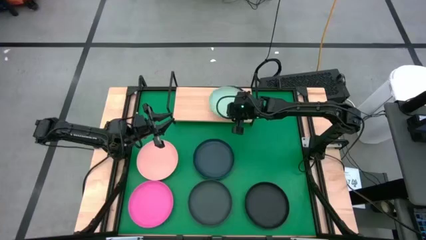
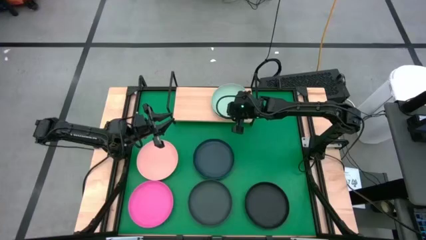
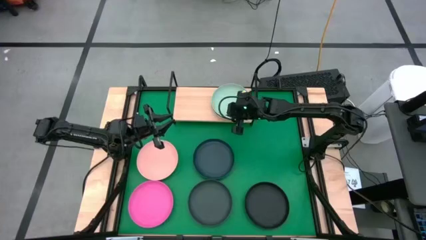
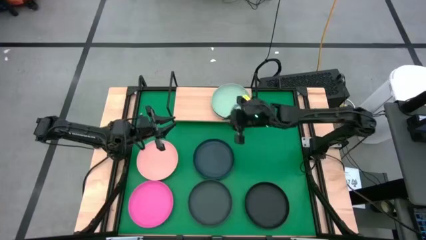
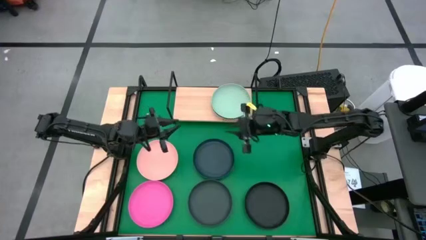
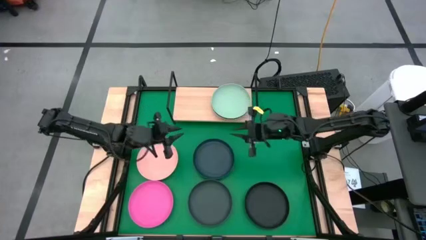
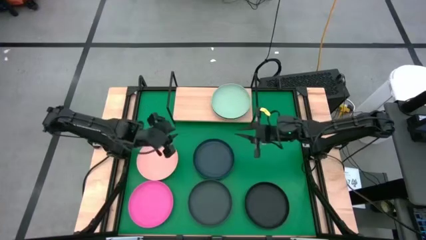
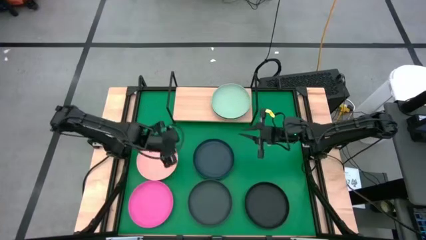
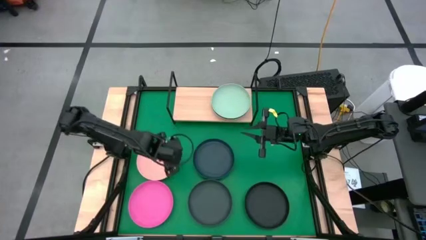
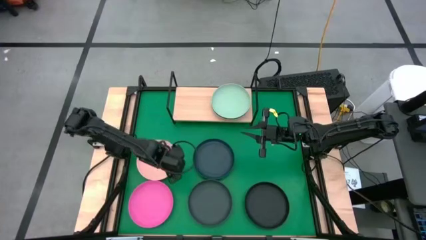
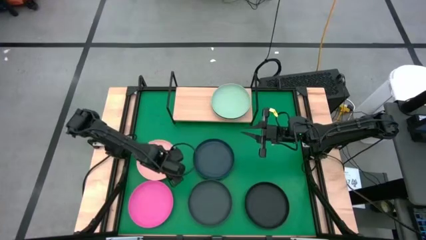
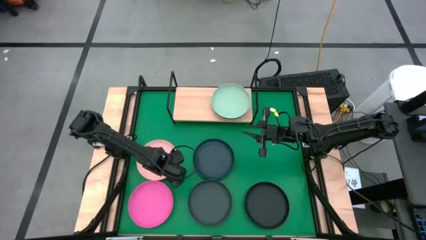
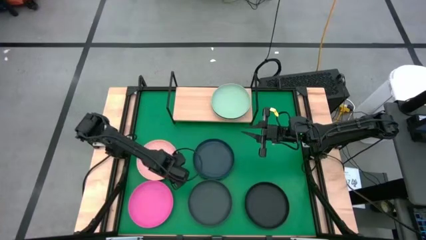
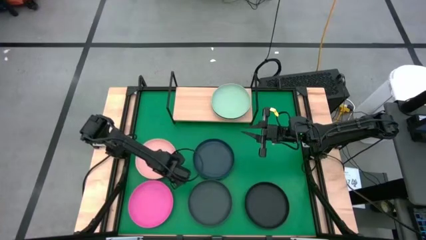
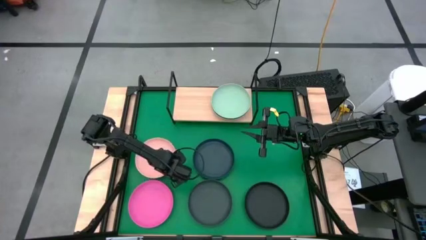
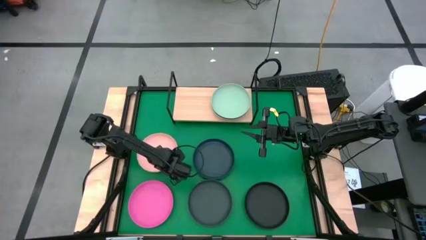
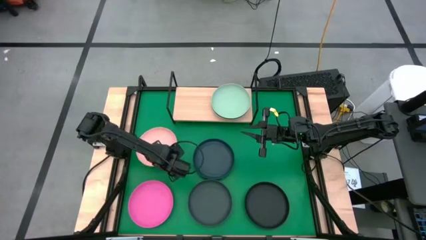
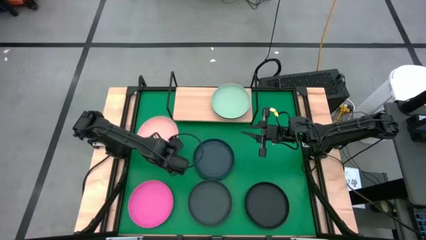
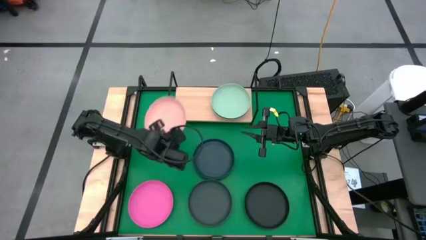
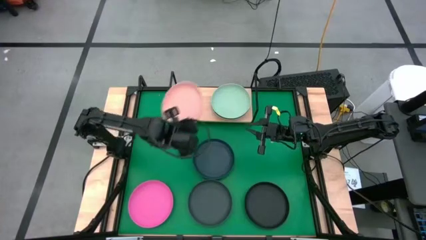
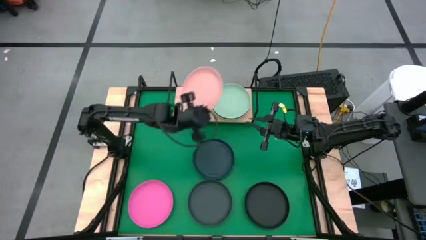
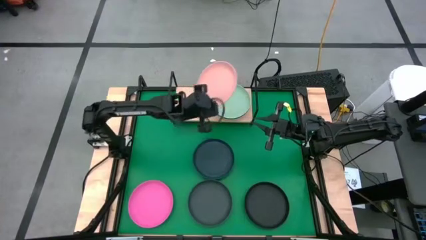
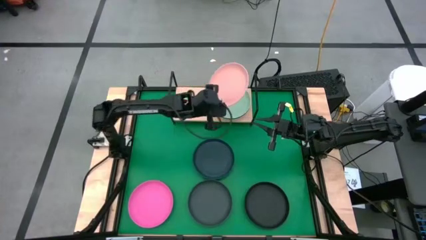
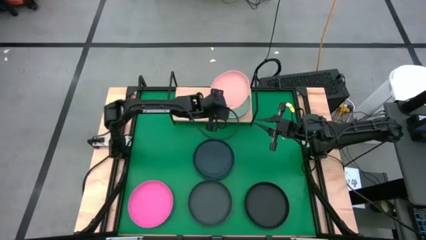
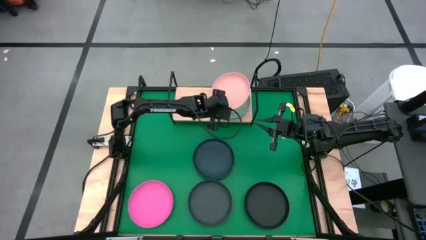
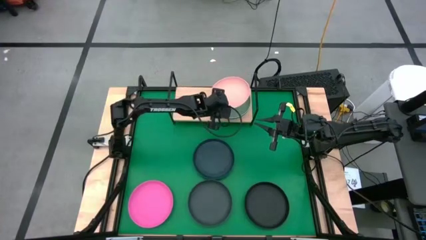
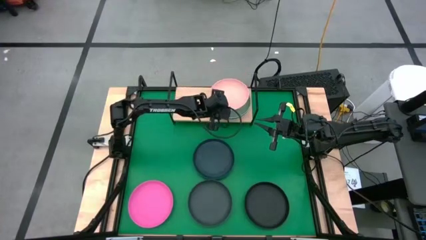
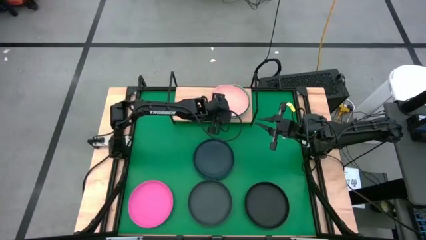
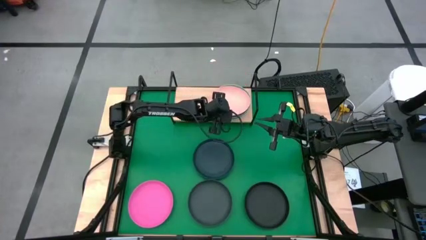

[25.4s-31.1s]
Task: Place and stack plates onto a shelf
Stack the brown plate on top of the light green plate on the shelf

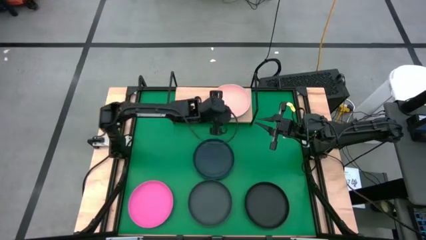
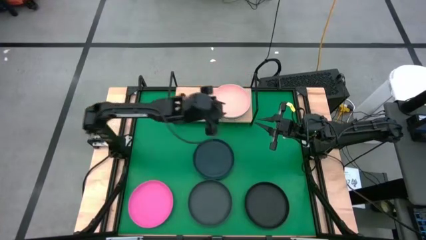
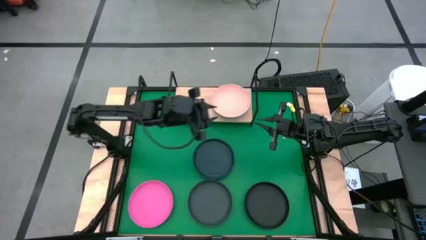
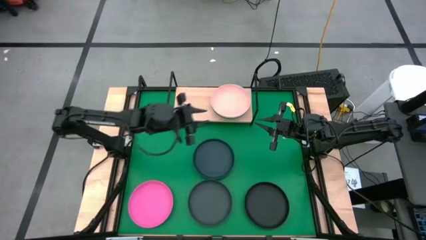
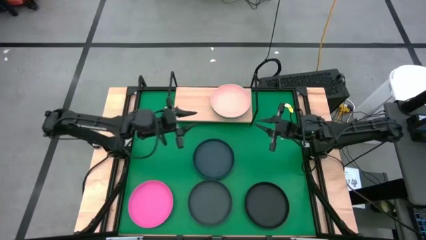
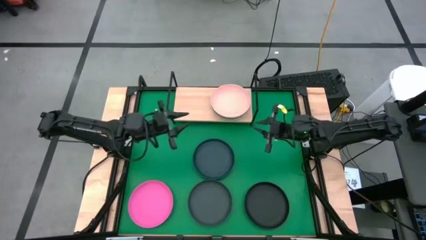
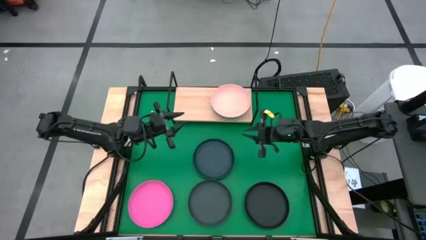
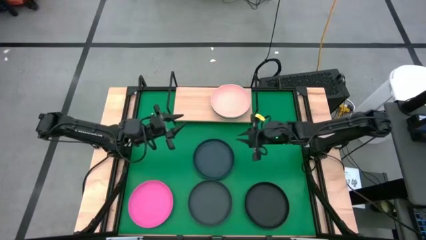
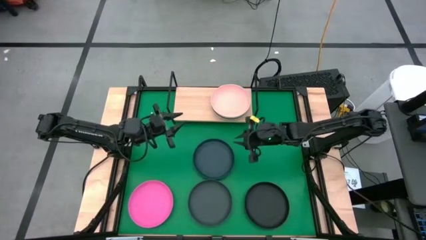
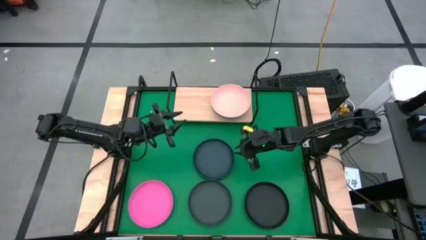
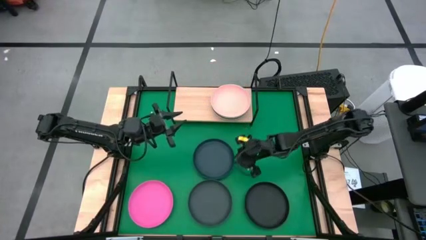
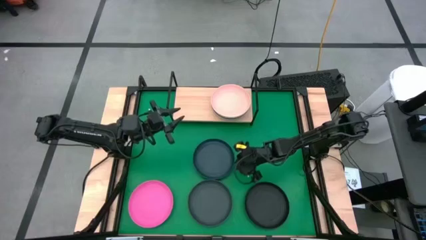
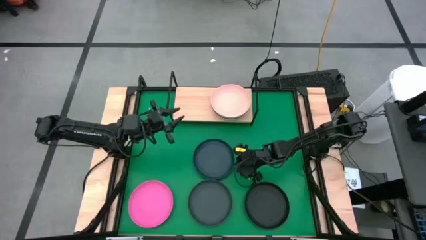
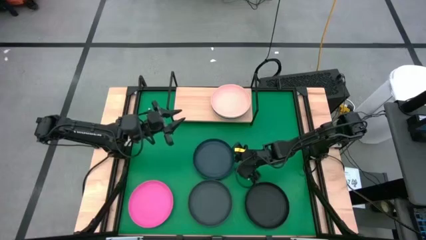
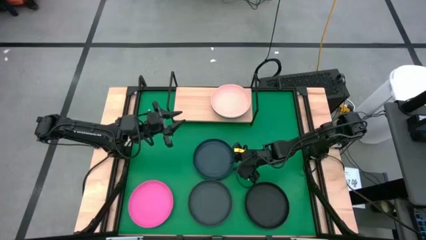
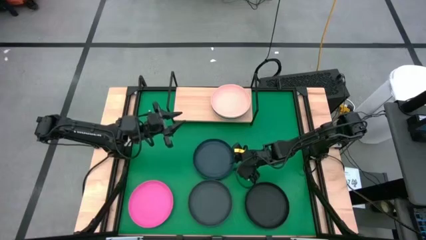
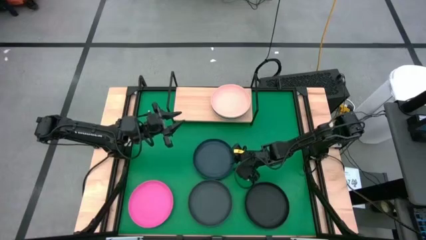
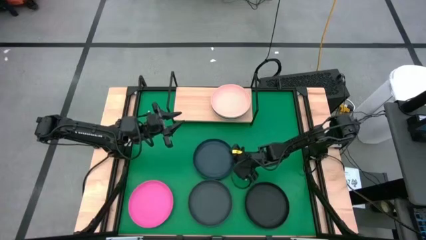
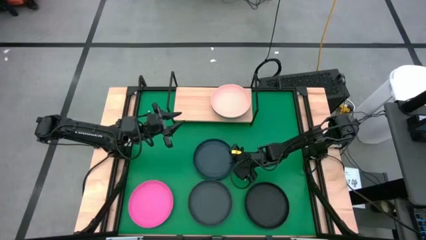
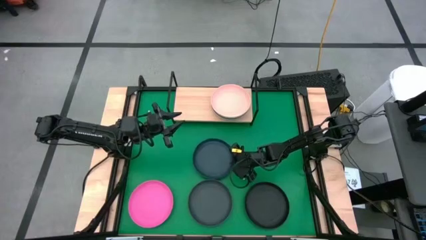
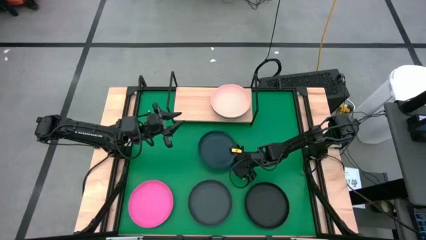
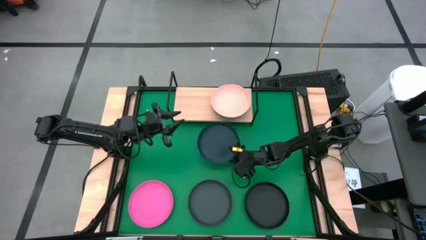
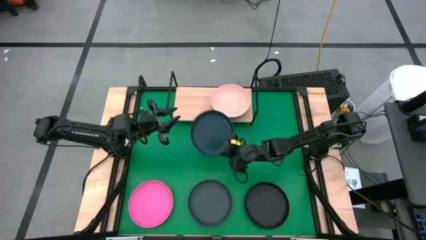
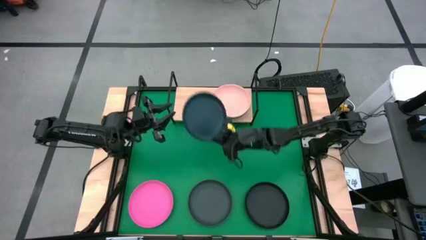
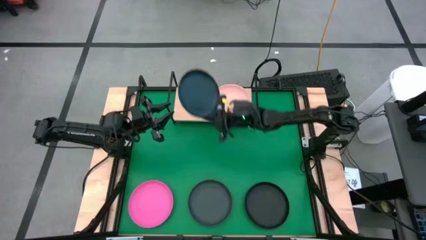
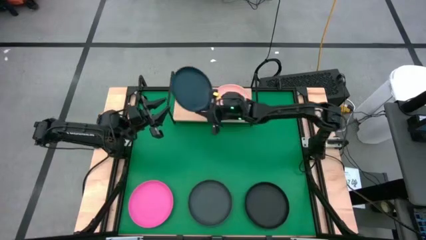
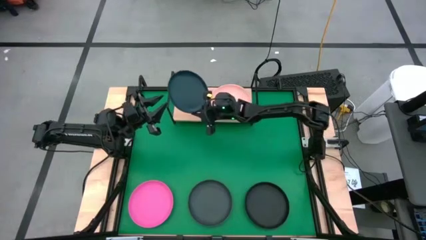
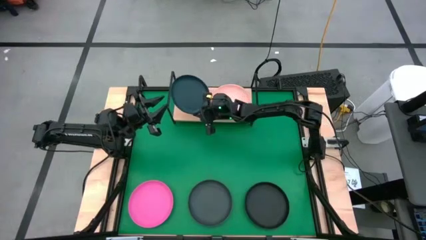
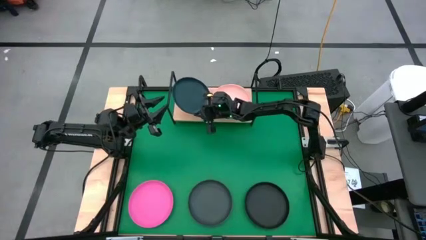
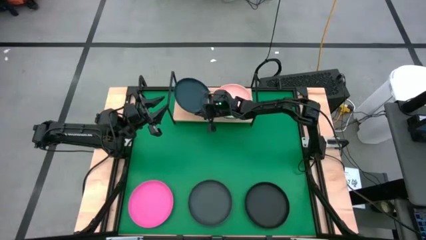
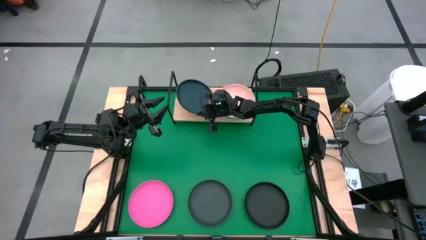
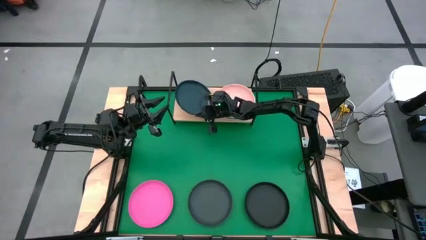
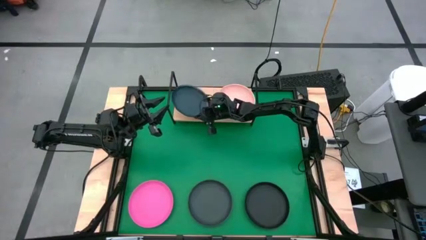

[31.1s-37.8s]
Put the blue plate on the shelf

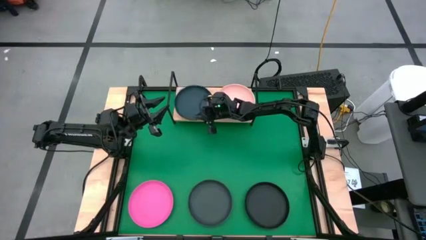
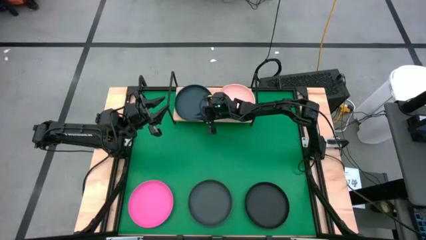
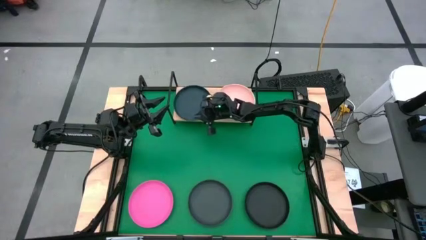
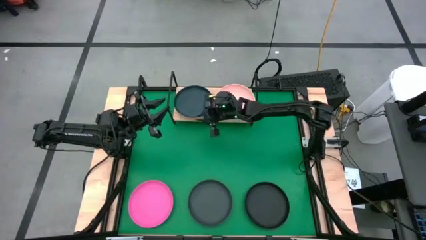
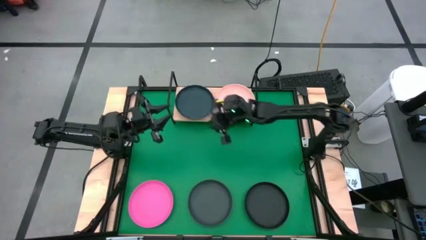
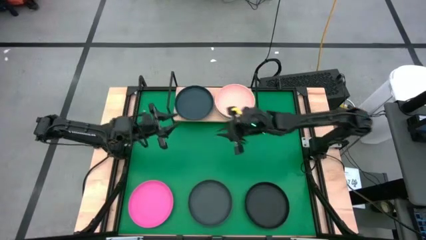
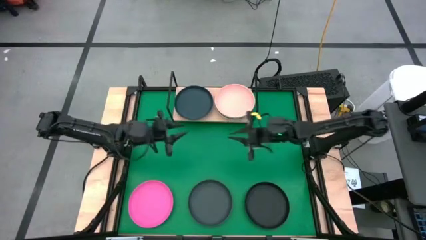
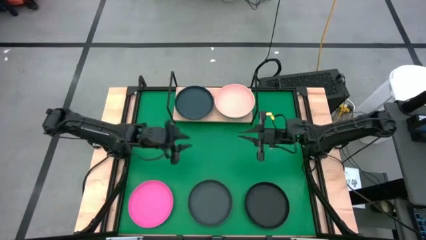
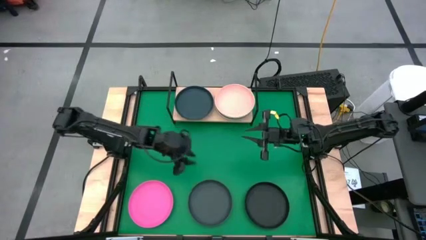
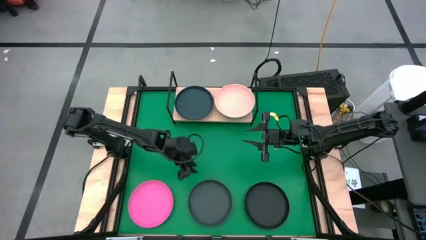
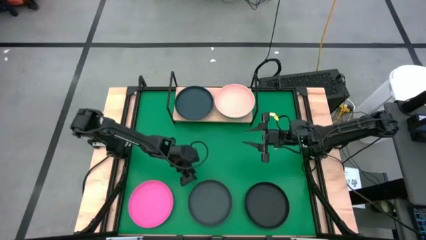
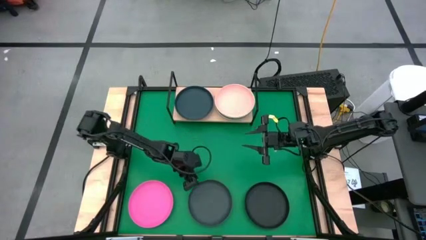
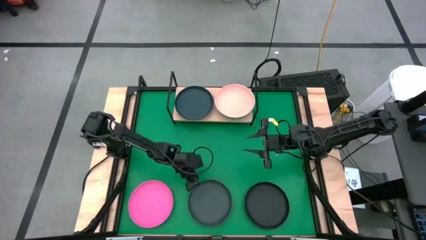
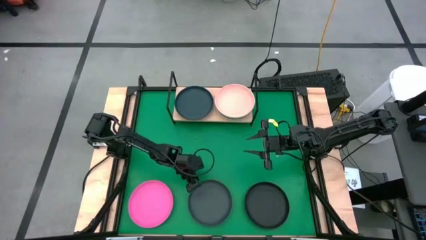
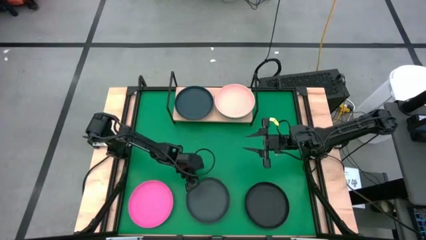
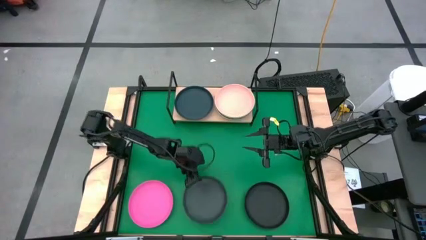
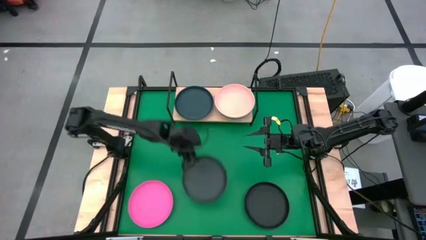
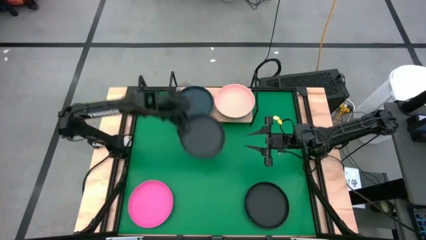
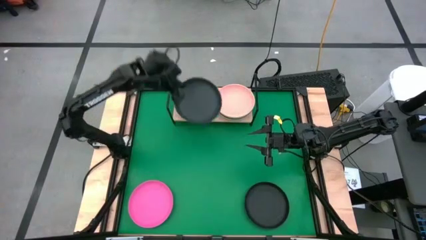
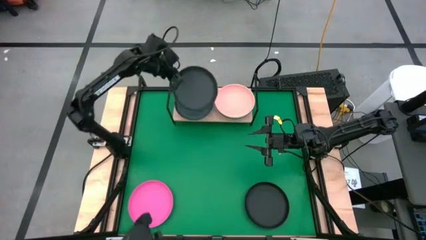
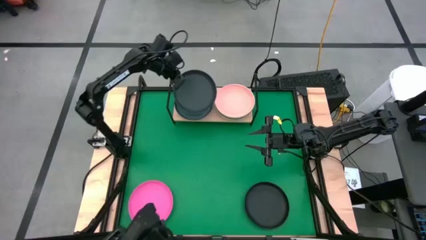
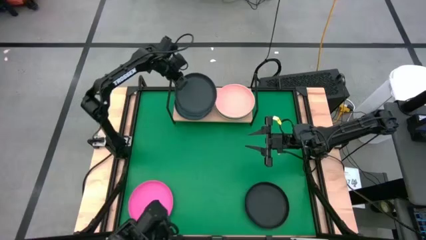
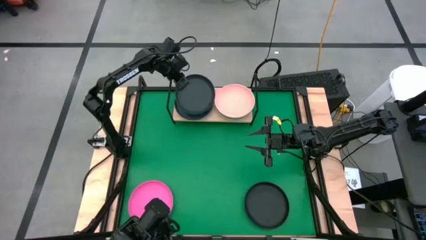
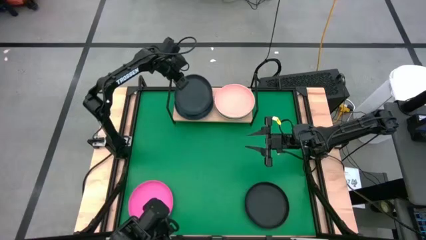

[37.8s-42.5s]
Stack the left black plate on top of the black plate on the shelf
